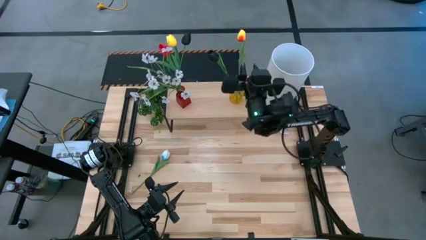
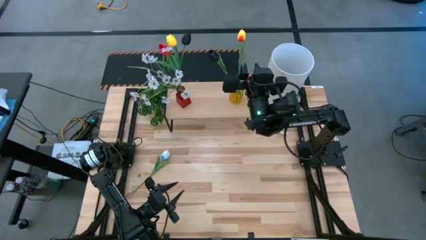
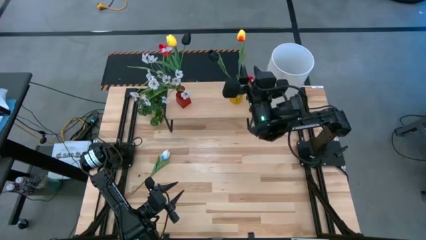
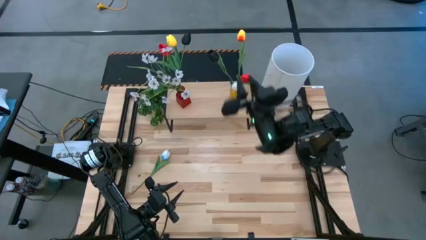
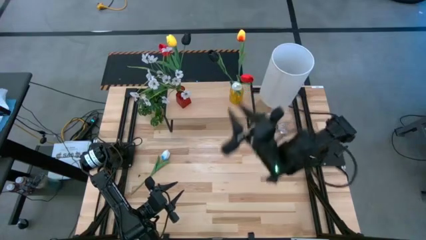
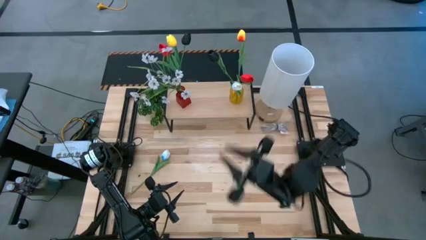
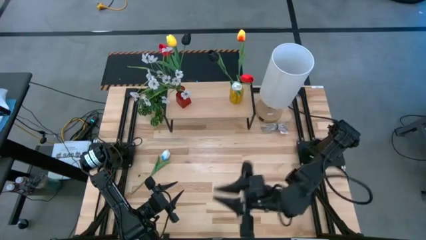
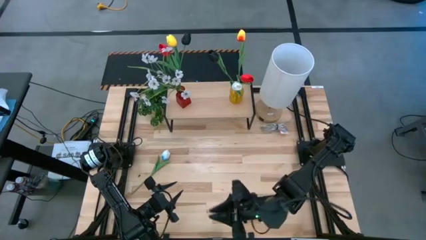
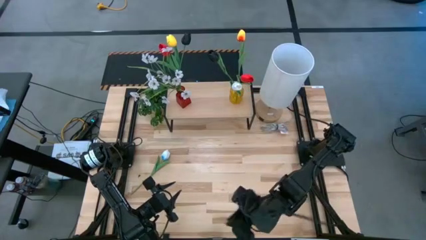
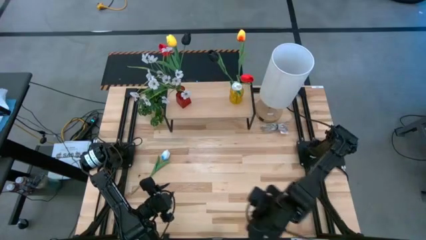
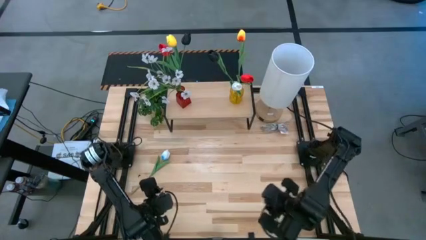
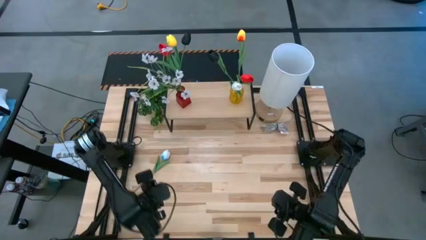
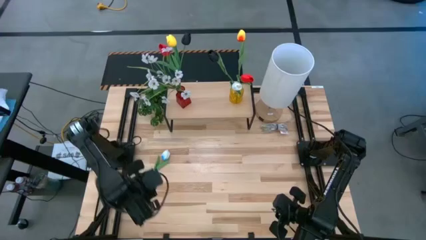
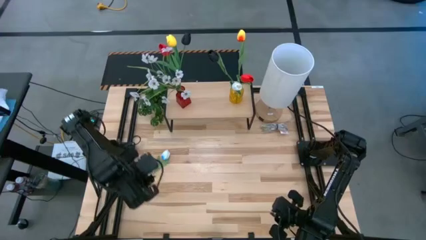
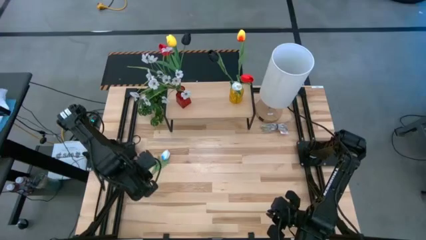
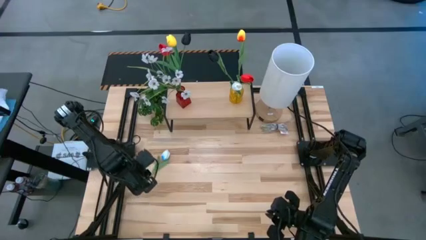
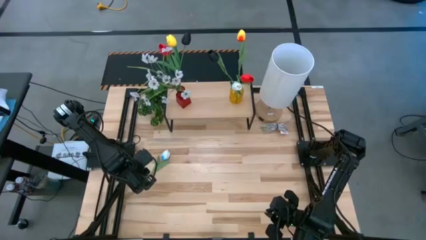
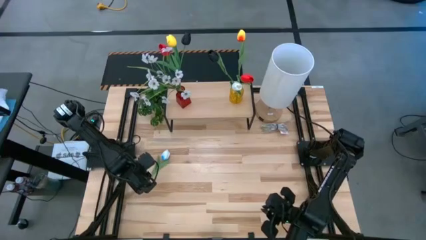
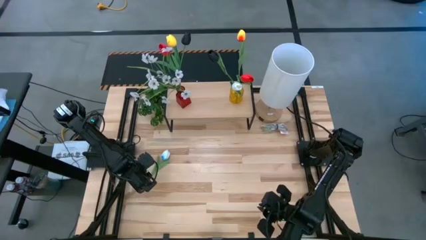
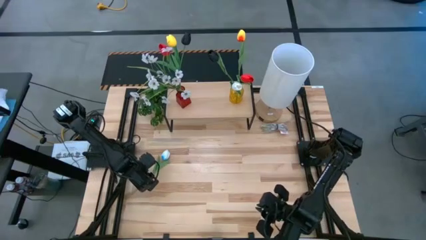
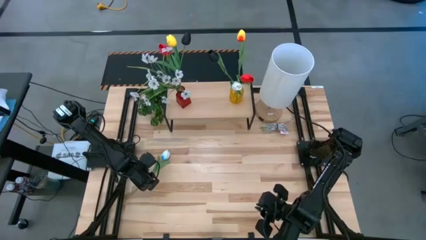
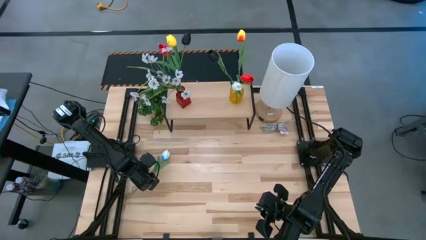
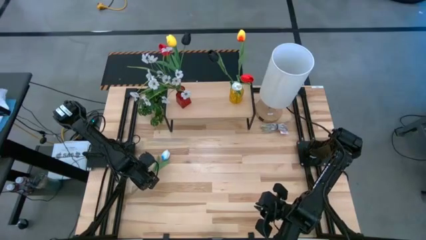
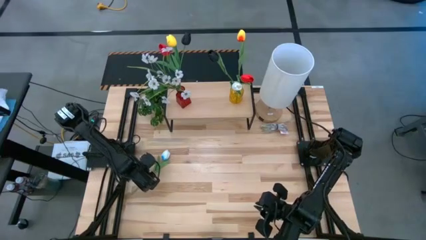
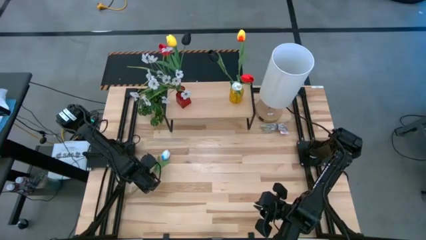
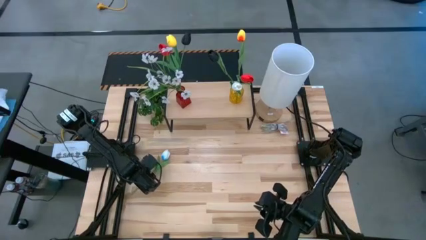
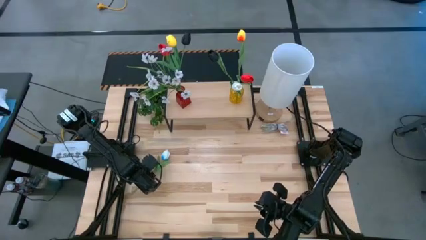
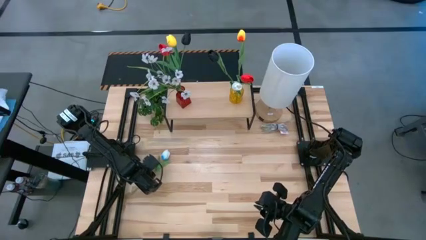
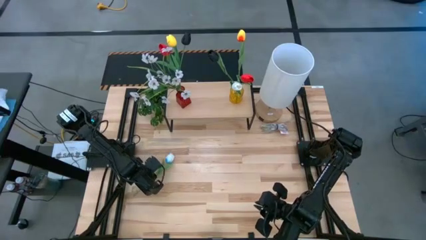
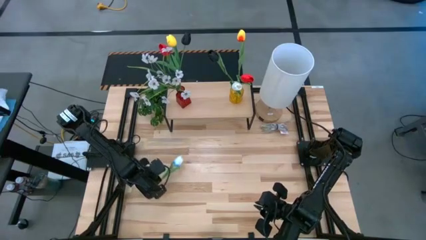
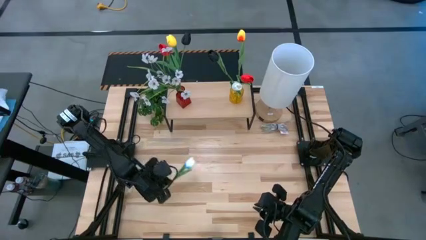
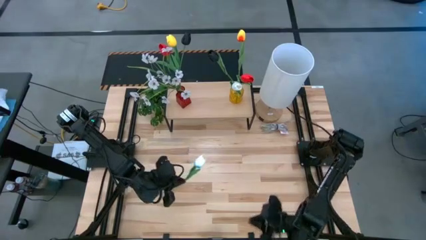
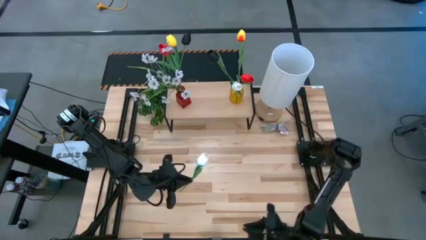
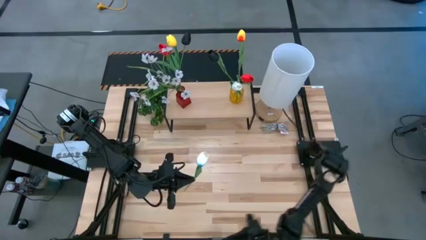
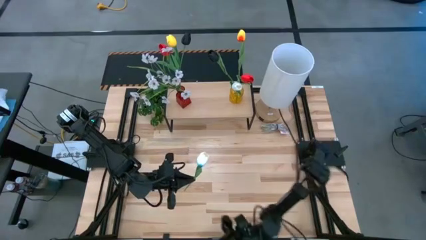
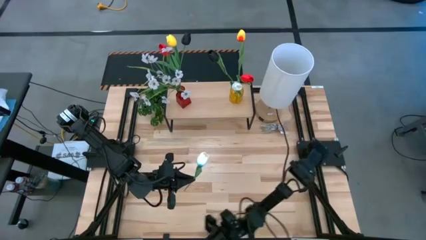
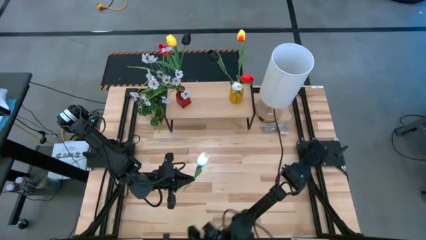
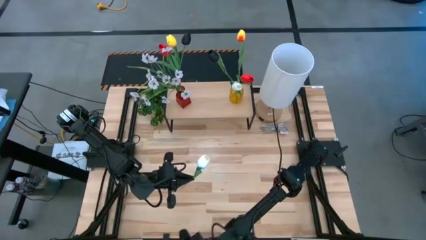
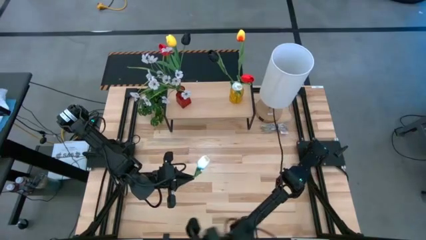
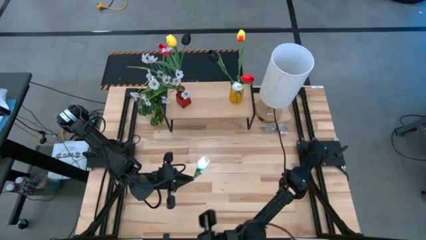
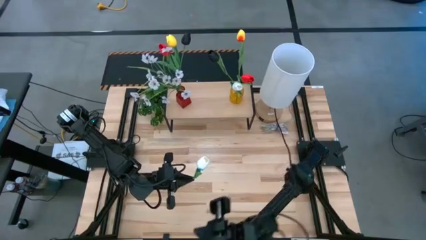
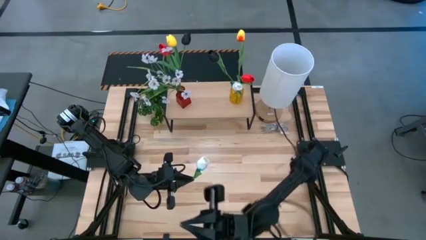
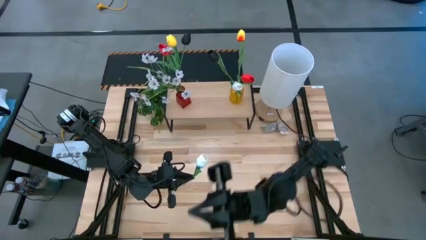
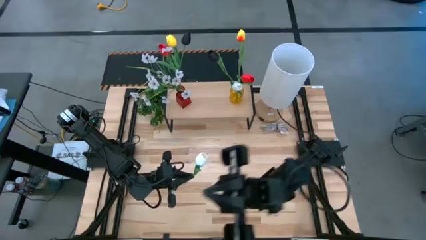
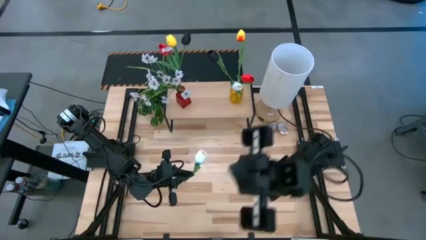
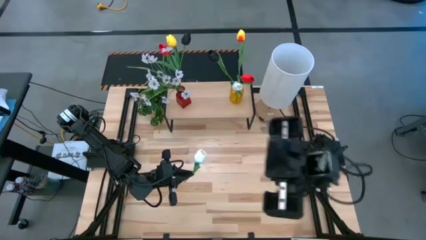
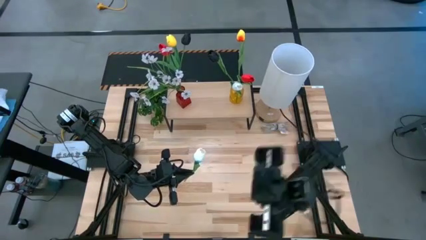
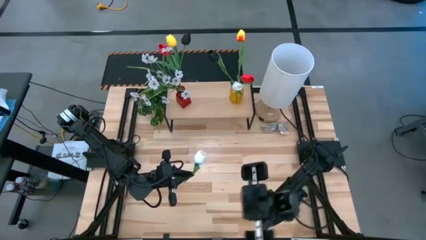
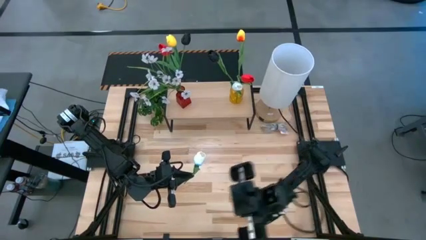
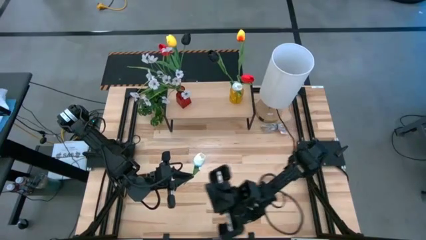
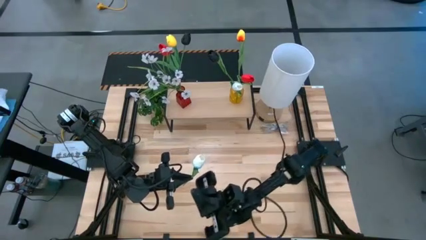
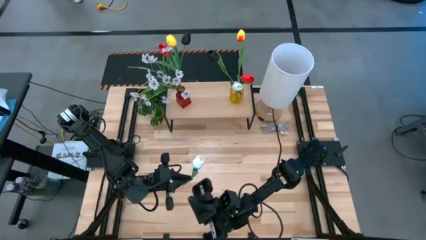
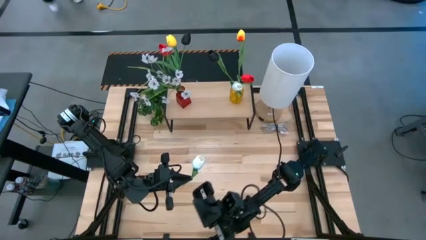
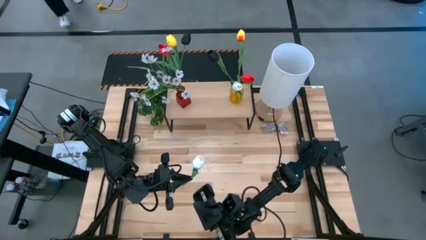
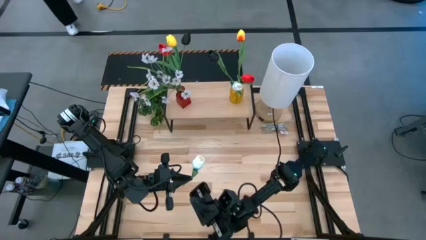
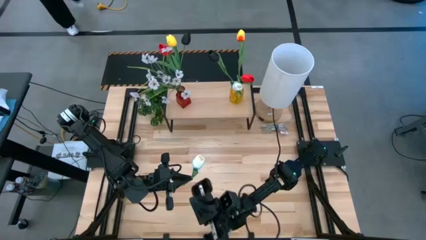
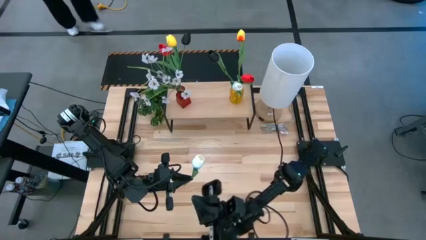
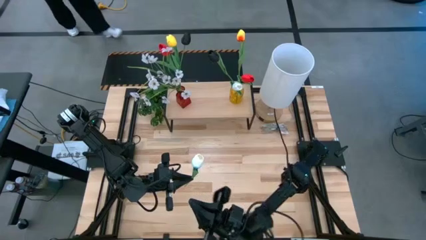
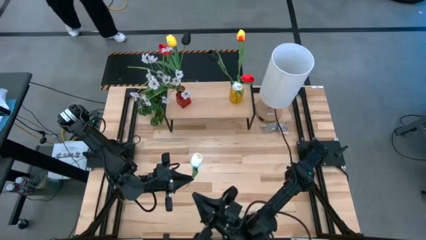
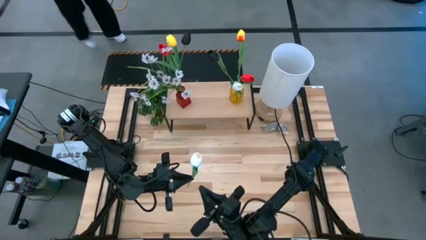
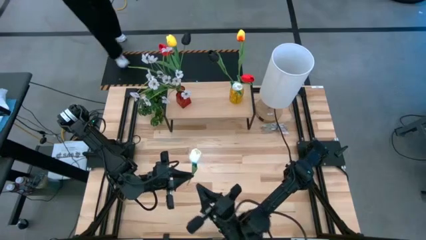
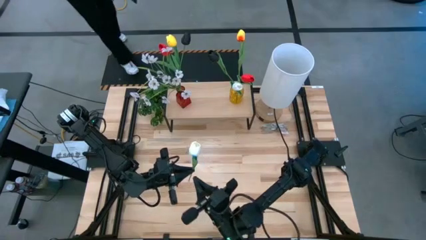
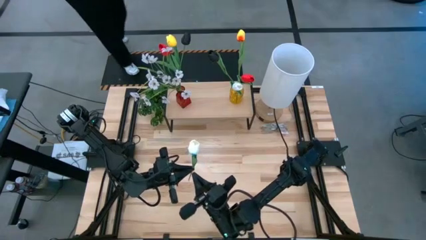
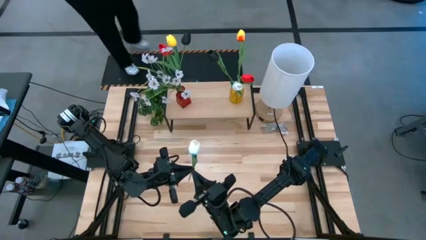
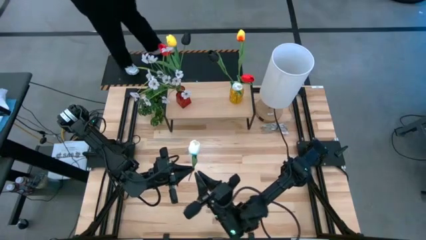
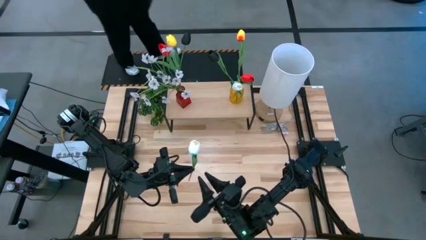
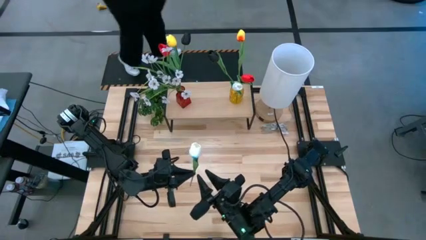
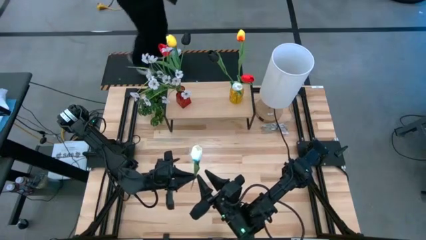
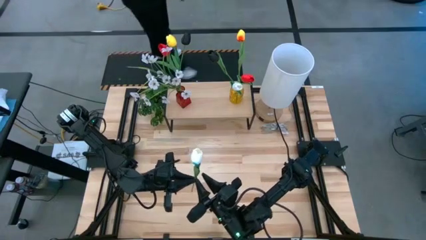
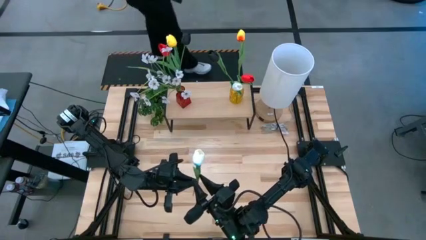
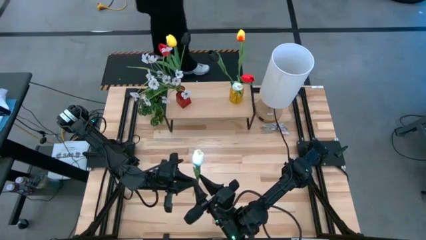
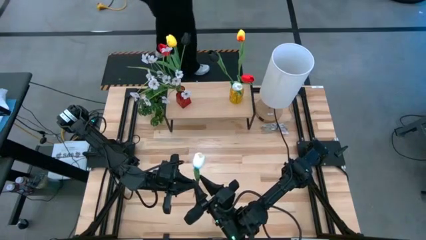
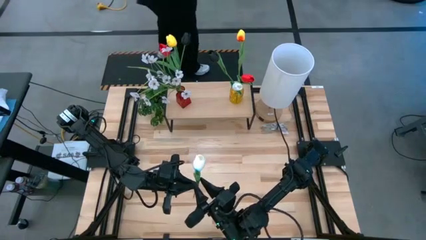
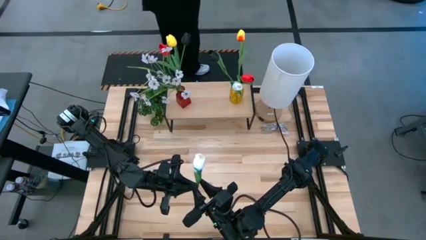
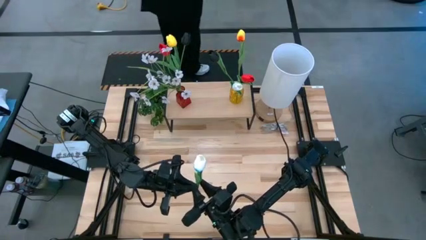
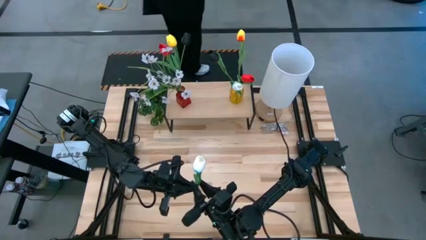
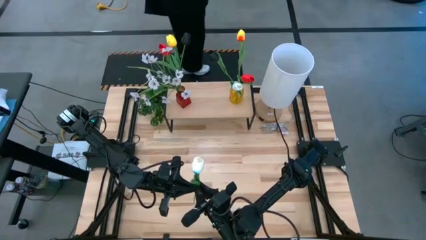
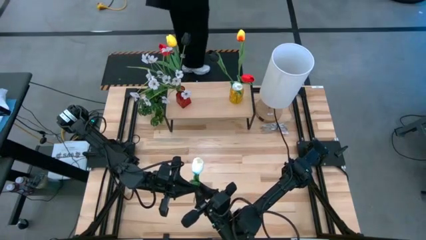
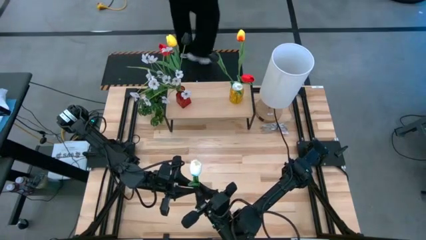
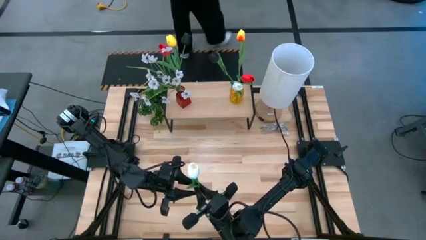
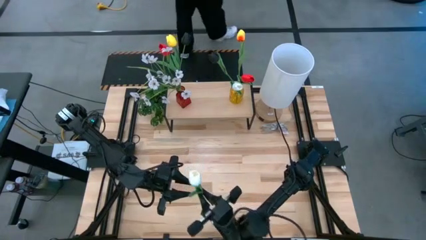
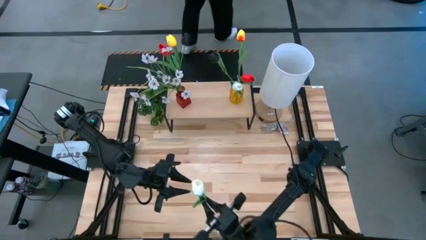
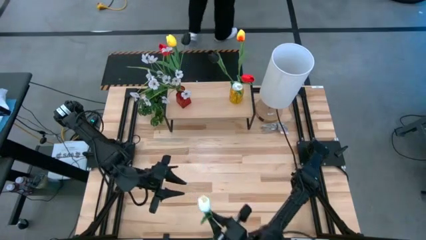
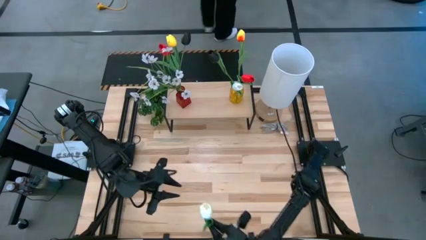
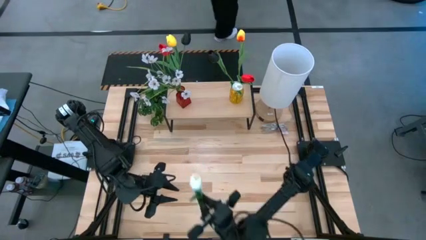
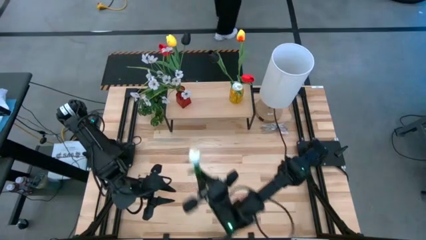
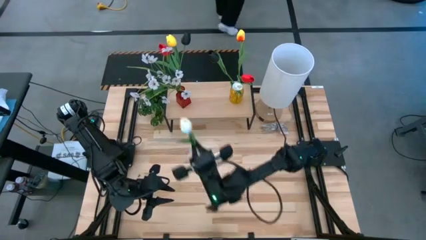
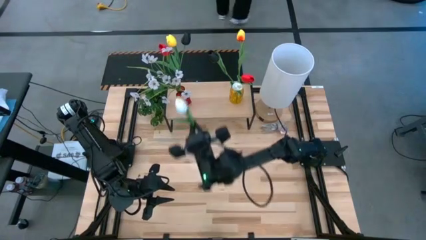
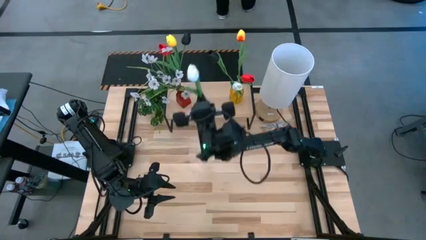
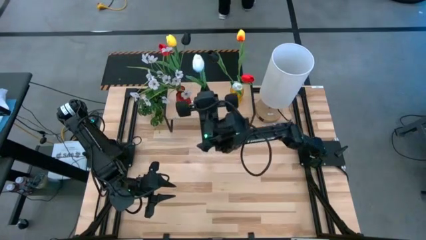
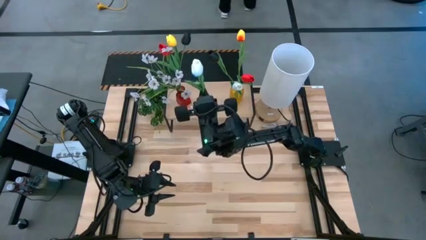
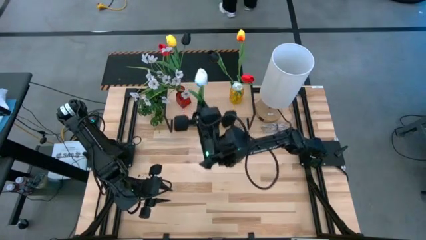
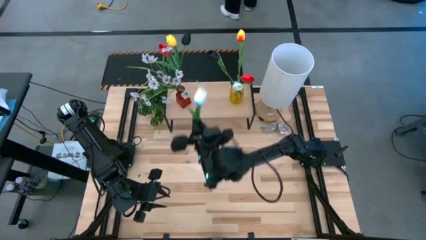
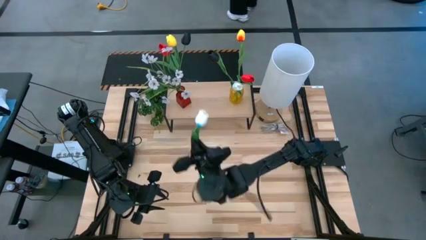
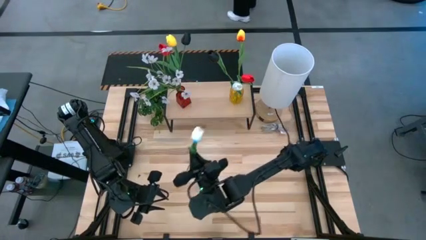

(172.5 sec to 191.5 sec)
Task: Pick and place flowers into a vace then onto a shelf
Put the white flower into the yellow vase on the shelf
